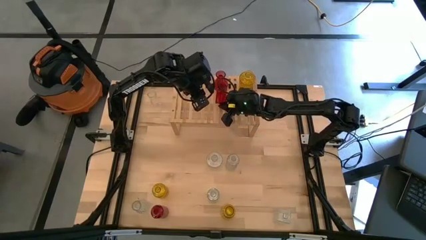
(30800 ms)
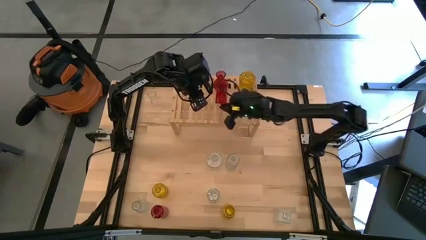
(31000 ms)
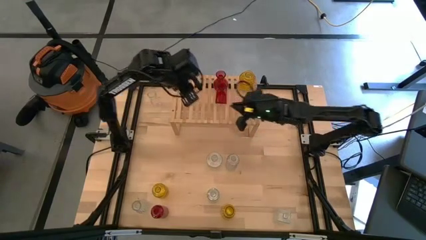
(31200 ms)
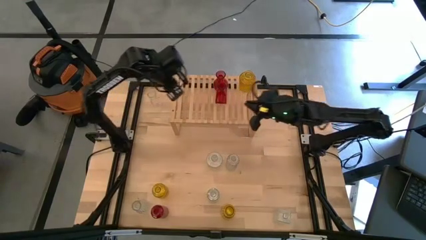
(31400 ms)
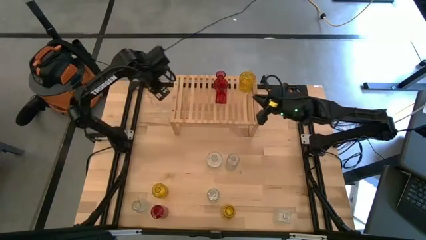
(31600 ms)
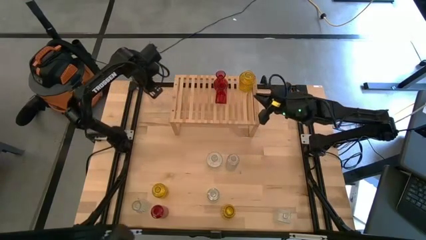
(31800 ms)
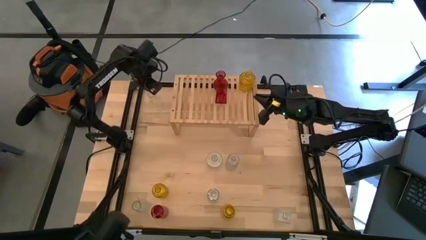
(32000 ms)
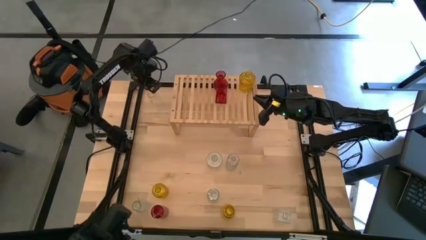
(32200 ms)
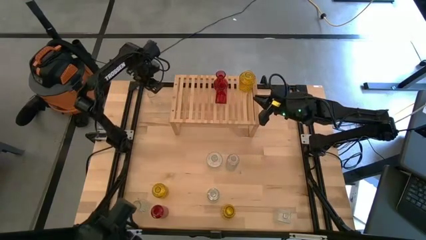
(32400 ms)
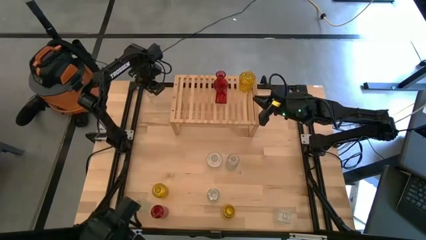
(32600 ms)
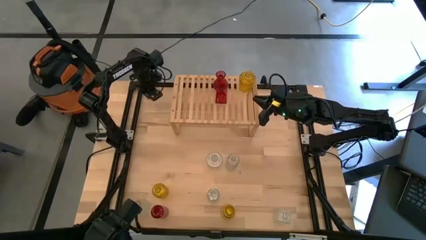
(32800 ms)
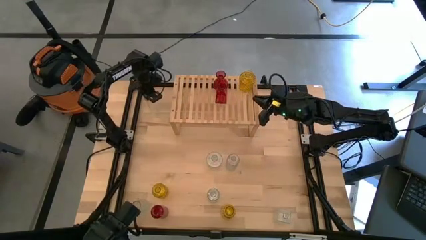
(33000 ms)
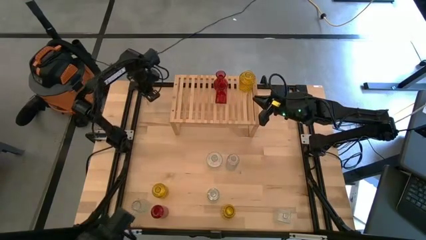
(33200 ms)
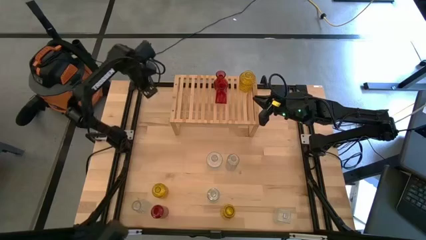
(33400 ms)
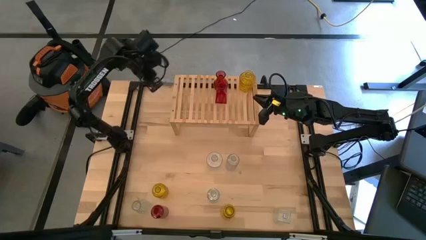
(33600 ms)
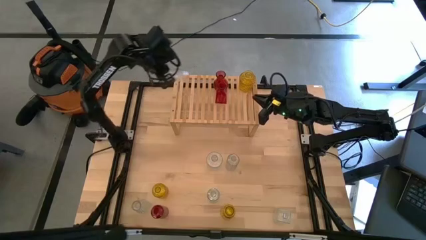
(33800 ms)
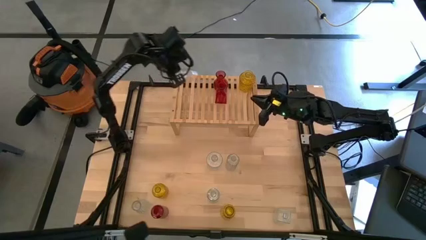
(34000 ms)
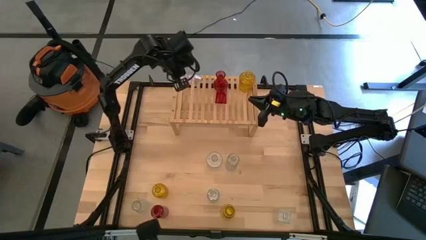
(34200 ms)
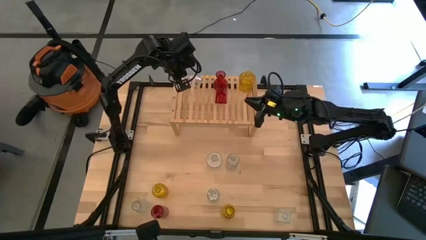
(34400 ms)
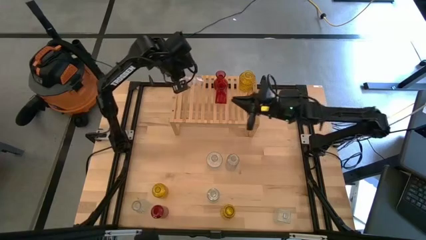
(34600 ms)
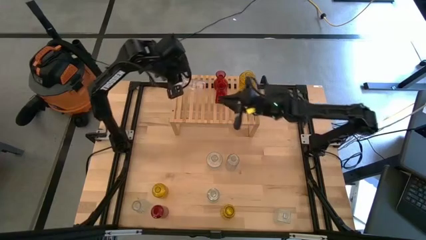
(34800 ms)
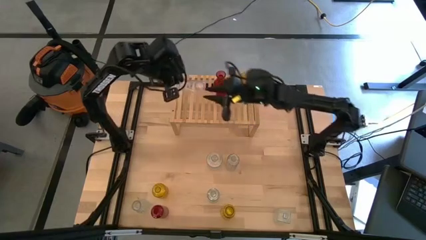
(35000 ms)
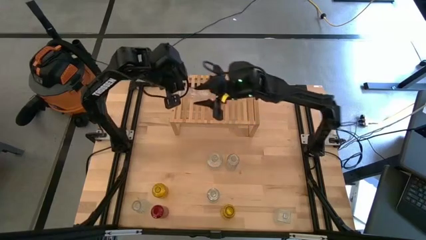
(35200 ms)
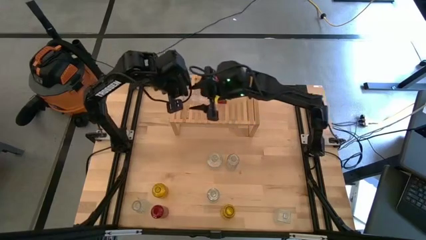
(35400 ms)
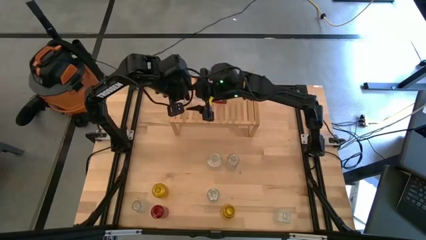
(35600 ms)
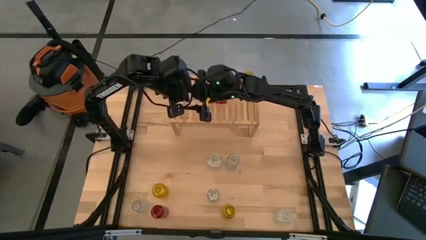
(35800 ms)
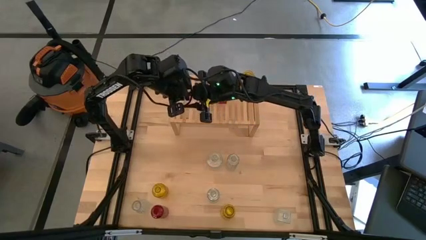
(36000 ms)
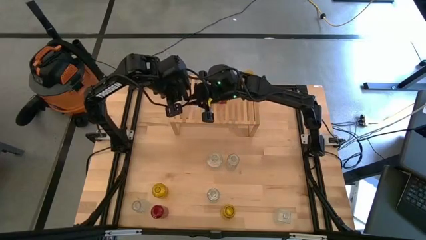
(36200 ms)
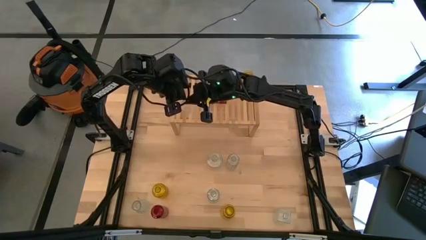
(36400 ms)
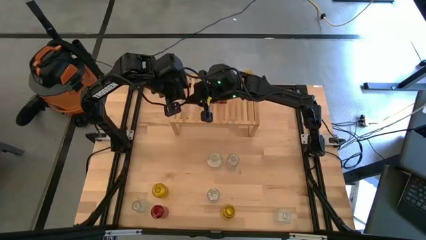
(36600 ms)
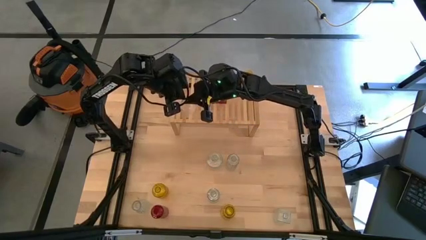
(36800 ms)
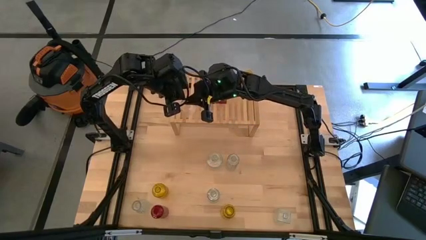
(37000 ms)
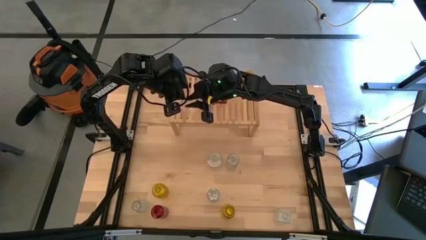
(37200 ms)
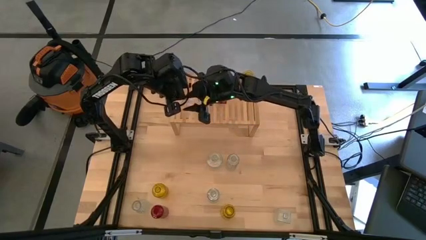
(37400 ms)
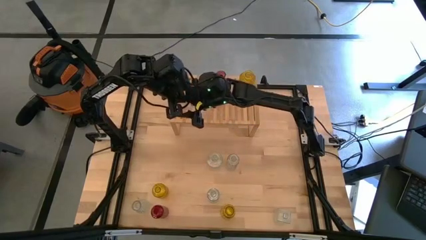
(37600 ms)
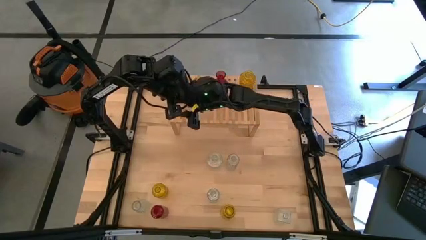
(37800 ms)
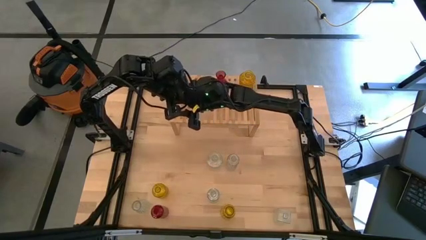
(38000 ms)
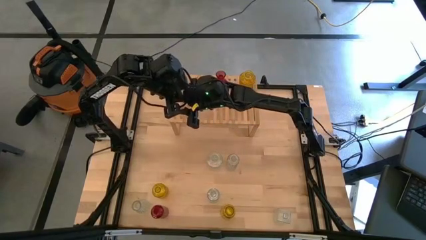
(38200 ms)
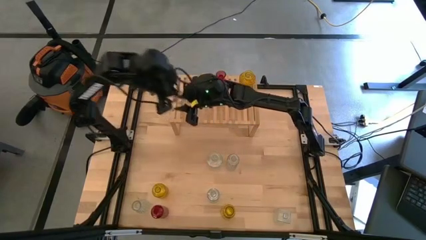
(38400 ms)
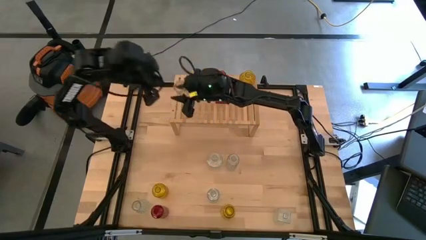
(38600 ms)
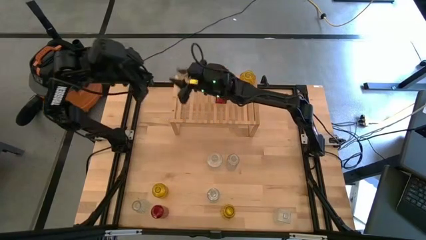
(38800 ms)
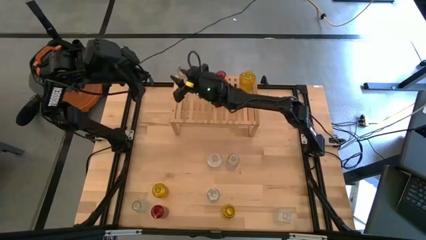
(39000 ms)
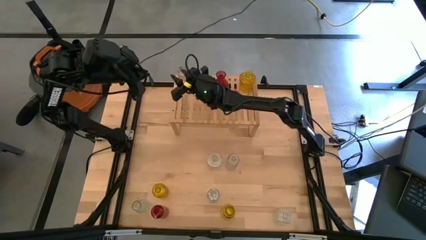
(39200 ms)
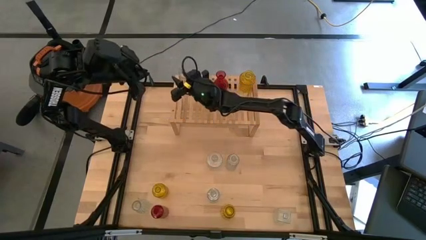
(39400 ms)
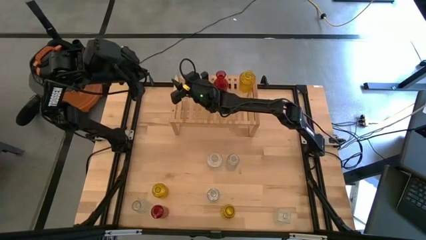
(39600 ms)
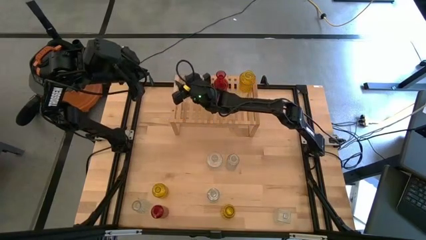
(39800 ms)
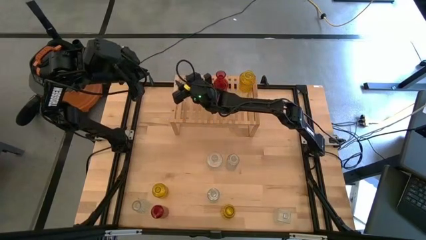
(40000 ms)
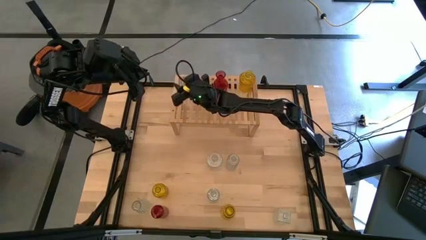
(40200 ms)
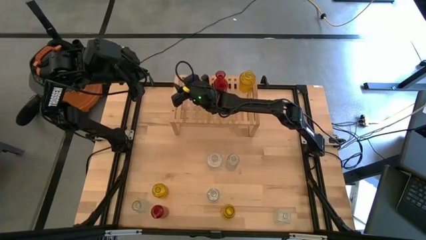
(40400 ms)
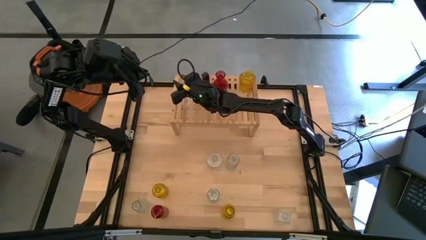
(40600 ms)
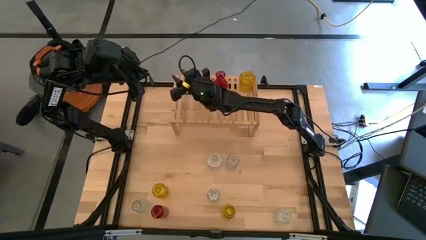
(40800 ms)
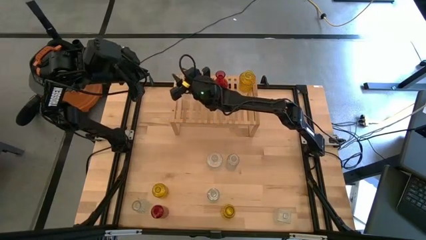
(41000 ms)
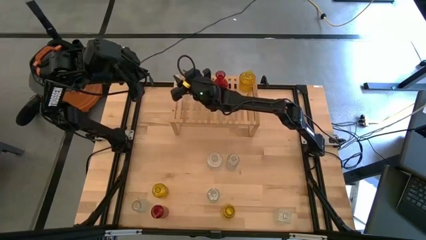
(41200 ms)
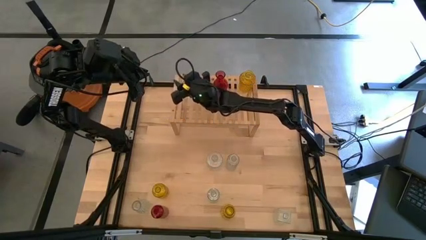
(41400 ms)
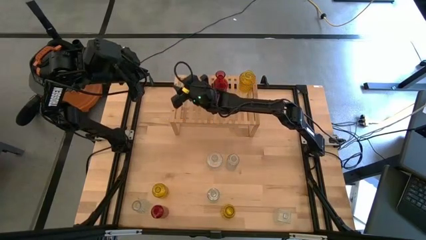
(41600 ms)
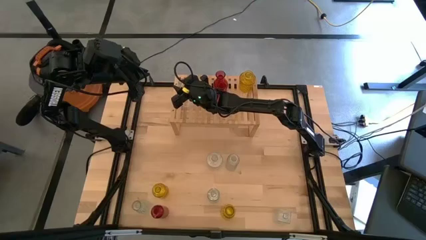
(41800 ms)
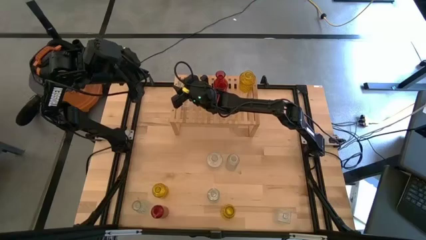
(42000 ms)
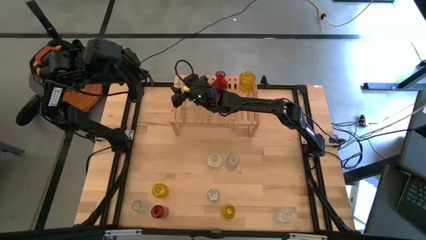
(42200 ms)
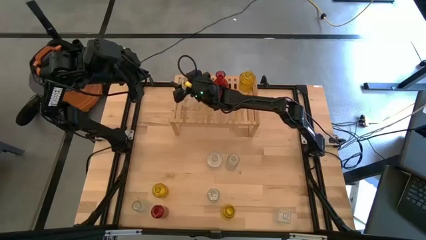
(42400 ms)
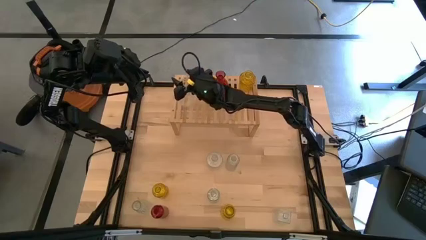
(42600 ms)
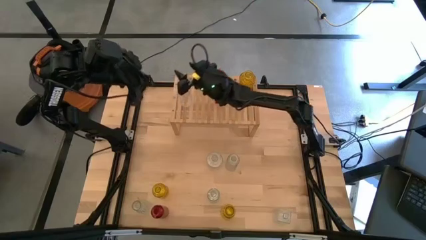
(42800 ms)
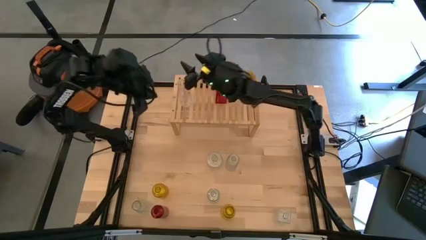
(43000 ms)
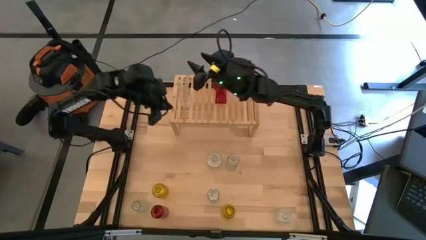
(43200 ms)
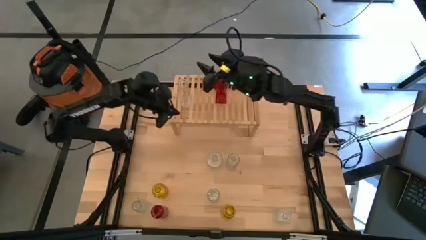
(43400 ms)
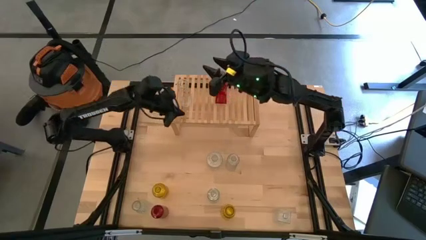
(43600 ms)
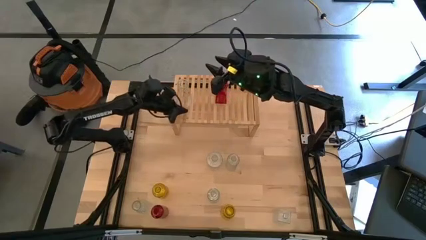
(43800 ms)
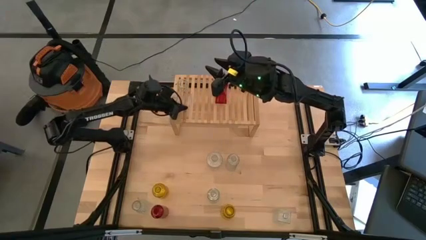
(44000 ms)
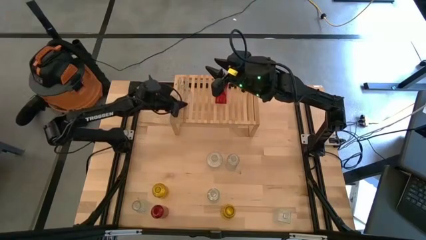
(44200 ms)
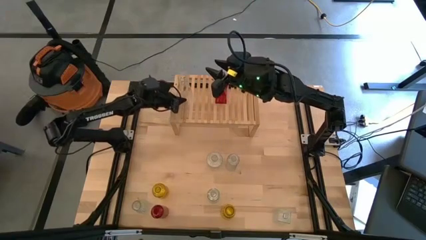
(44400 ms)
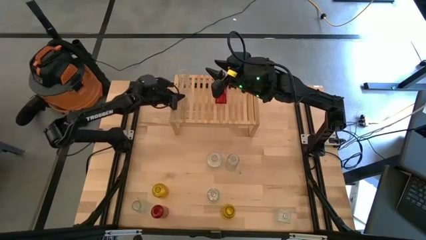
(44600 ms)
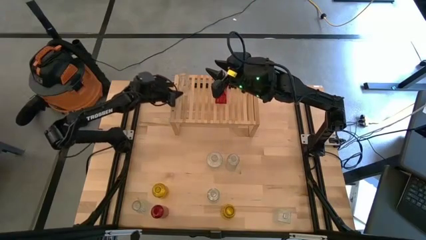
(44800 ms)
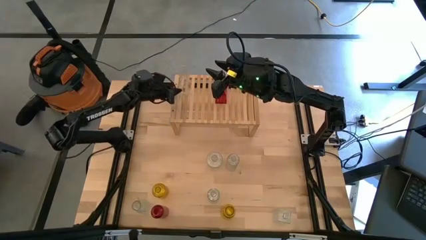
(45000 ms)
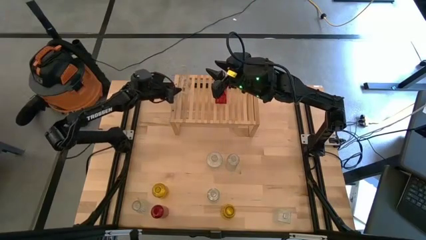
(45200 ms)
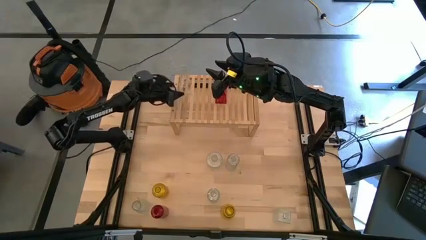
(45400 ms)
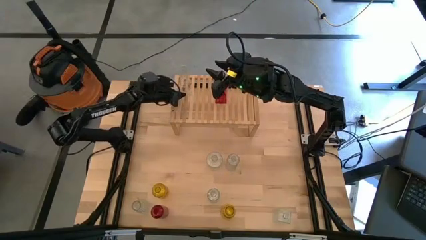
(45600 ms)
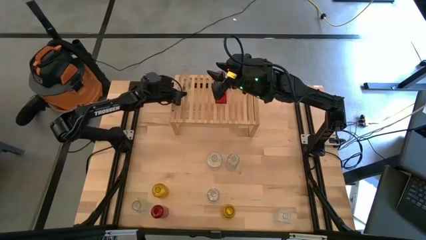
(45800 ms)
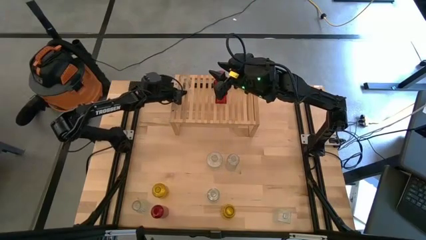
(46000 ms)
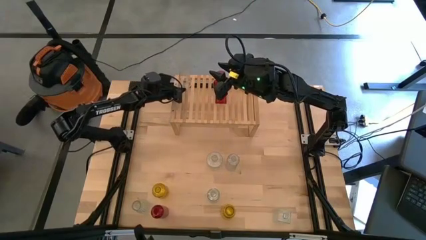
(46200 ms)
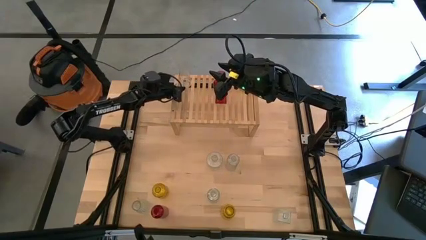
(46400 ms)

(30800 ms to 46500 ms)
Task: sort vases onto shelf
Put the transparent vase on the shelf

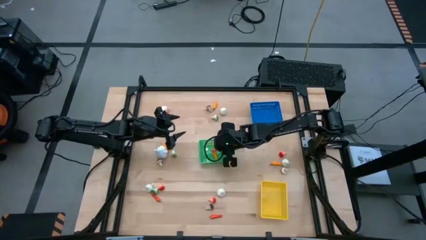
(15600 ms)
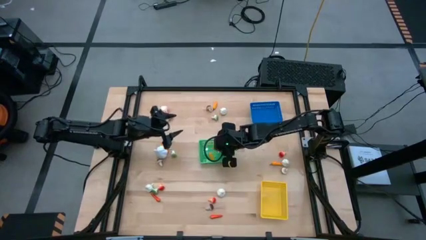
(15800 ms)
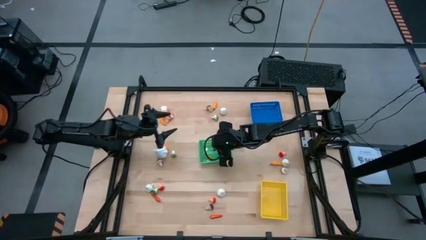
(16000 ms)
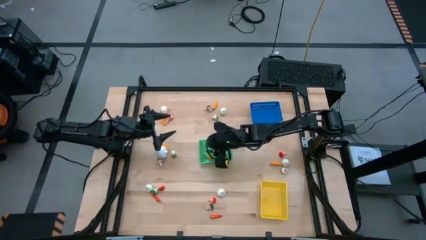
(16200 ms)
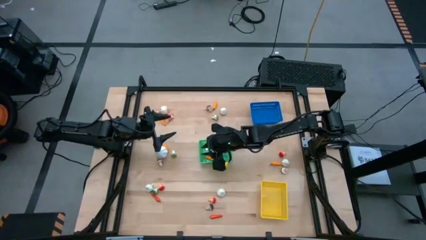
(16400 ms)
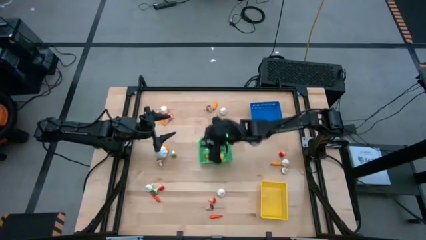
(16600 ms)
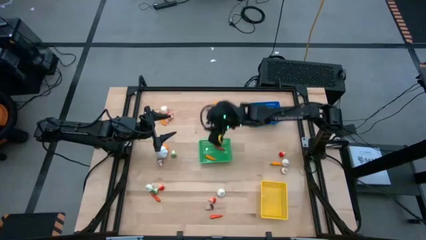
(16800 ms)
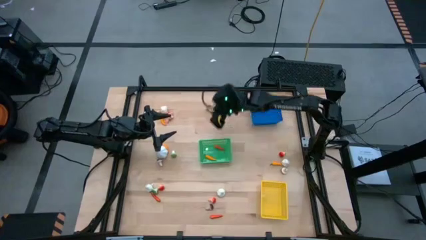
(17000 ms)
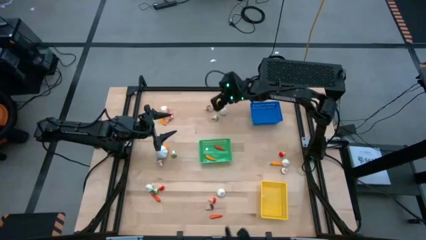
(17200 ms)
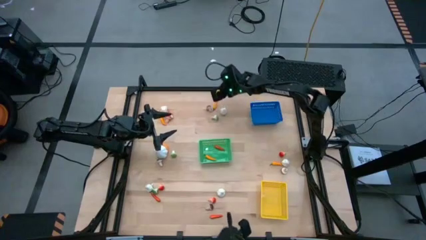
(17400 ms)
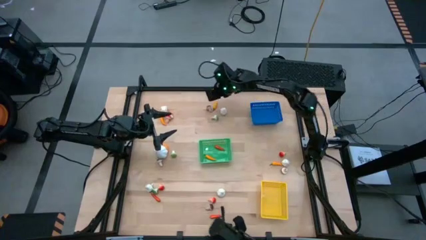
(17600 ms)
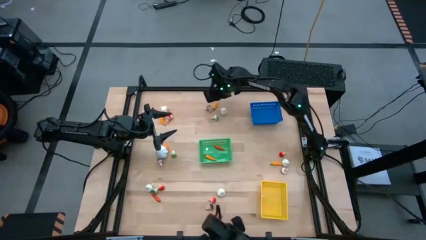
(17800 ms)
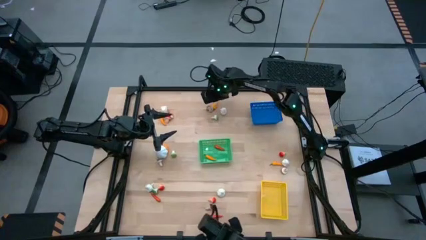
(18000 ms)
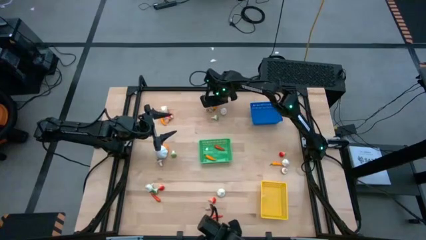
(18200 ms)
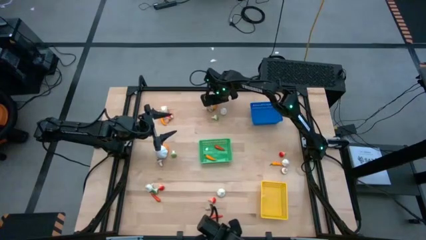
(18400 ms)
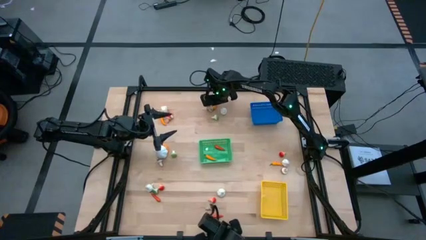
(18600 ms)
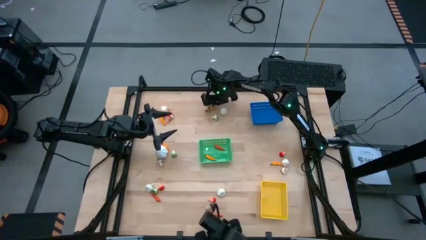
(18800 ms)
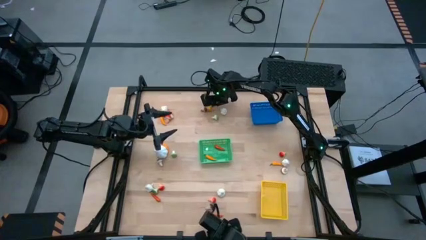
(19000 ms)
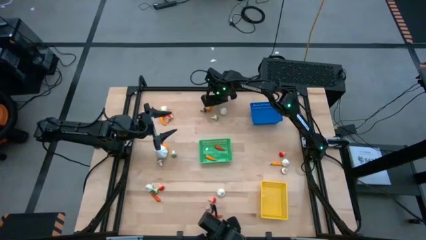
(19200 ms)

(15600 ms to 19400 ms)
Task: Sort produce into baskets
Put the yellow chili pepper into the green bin
